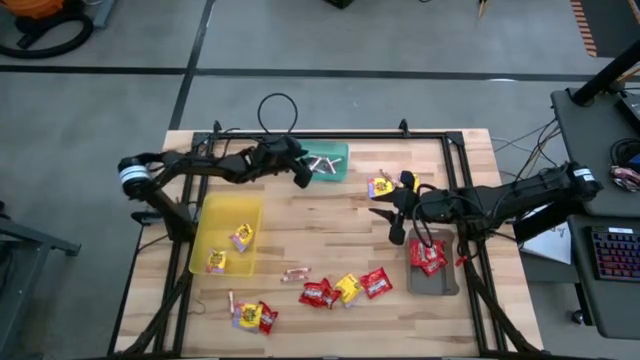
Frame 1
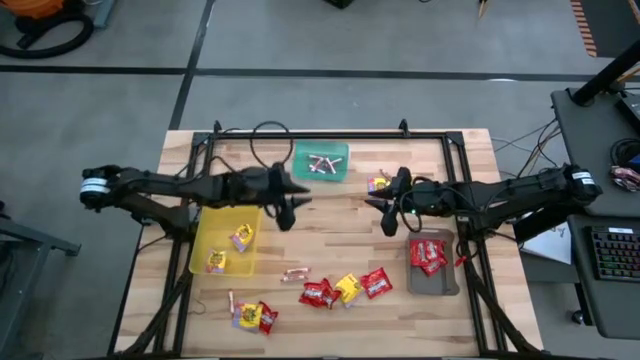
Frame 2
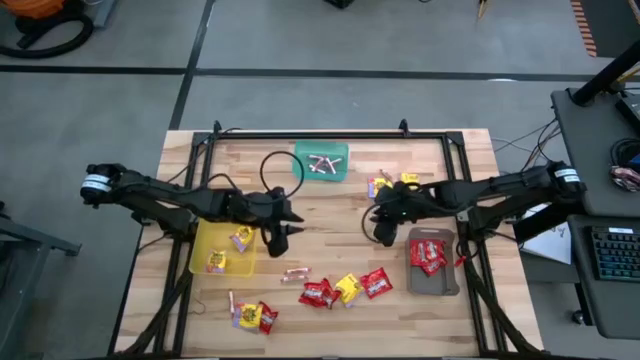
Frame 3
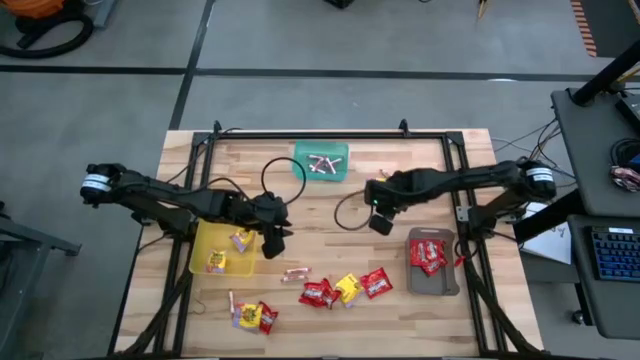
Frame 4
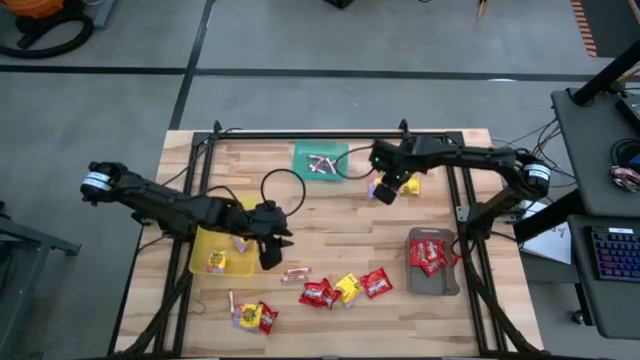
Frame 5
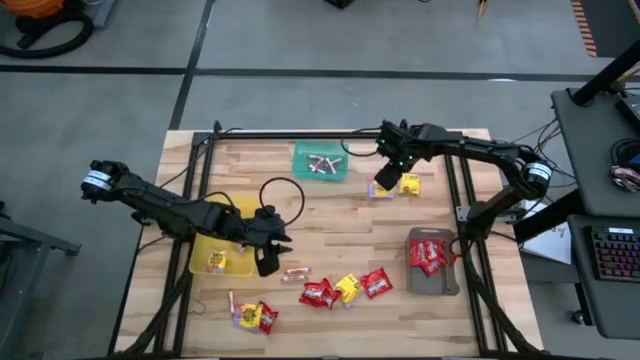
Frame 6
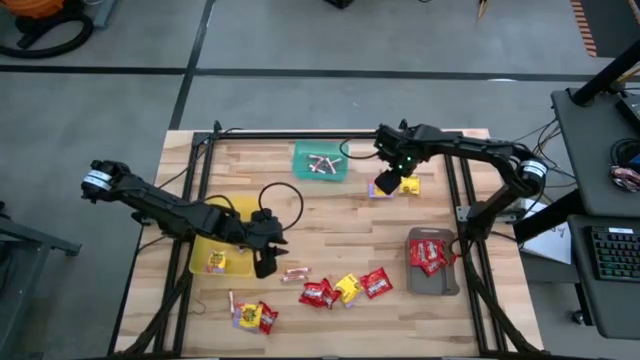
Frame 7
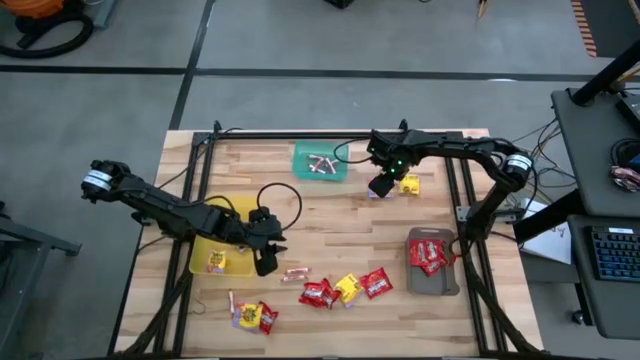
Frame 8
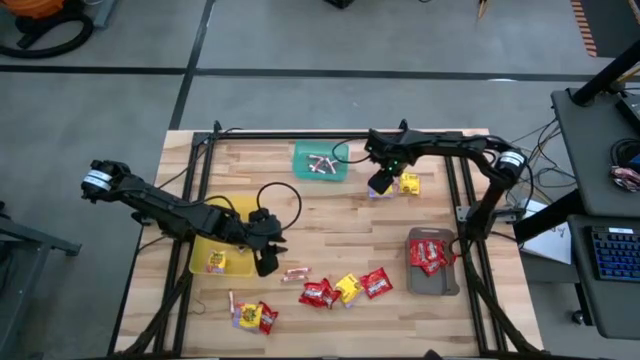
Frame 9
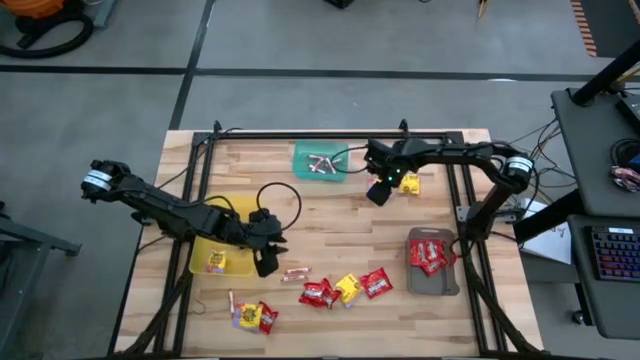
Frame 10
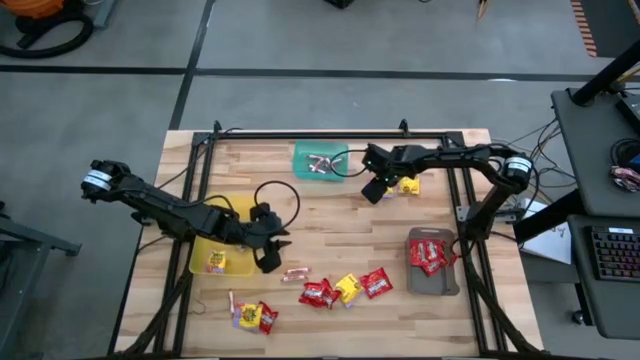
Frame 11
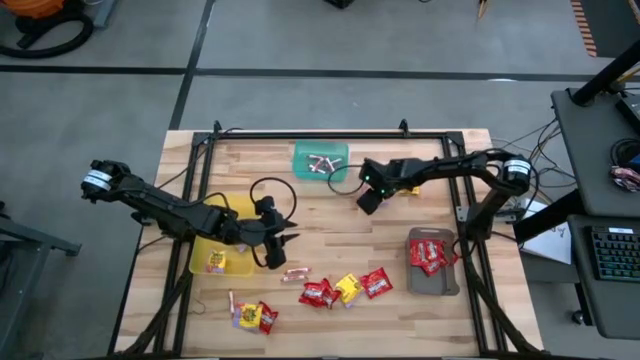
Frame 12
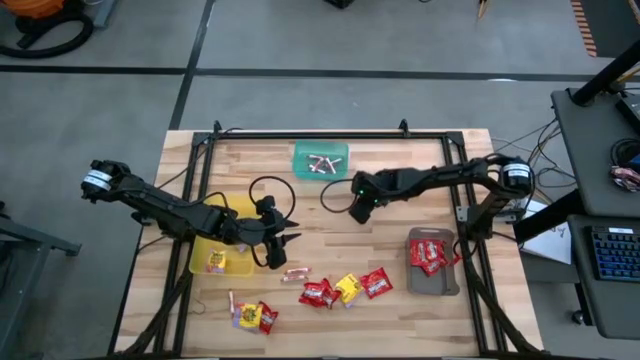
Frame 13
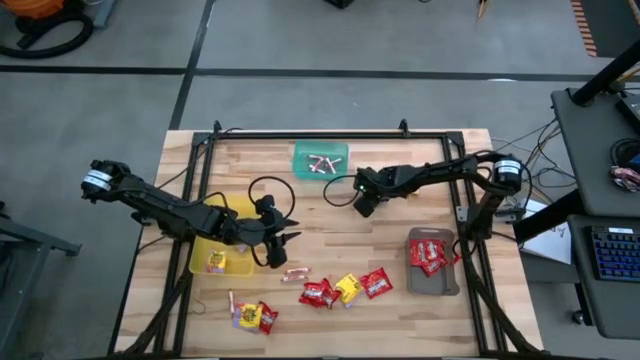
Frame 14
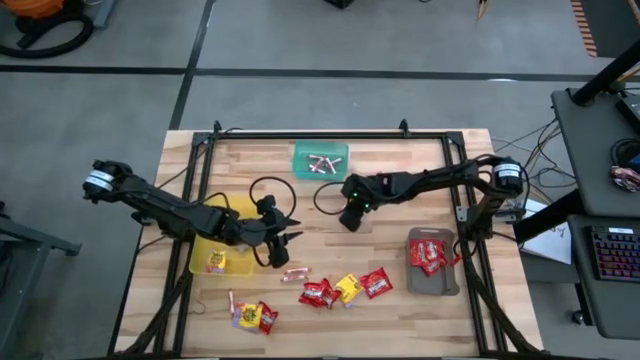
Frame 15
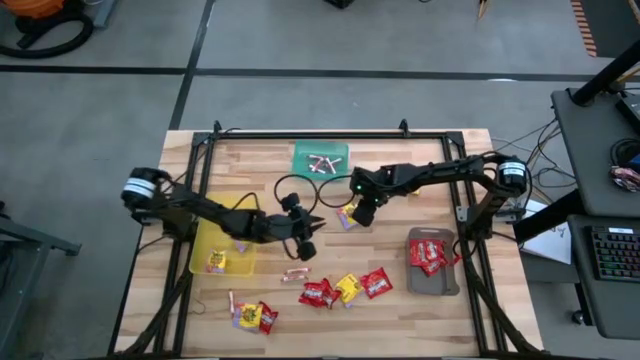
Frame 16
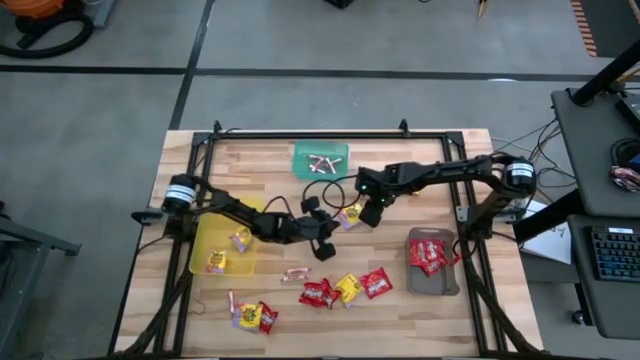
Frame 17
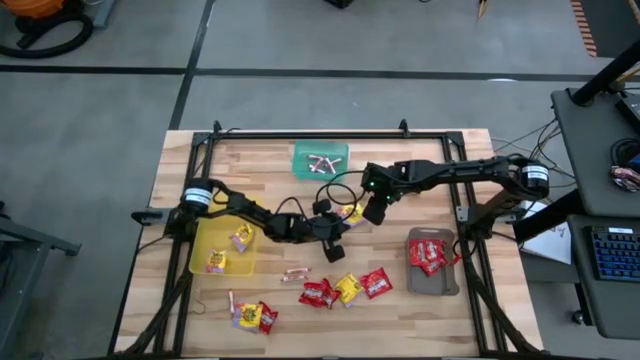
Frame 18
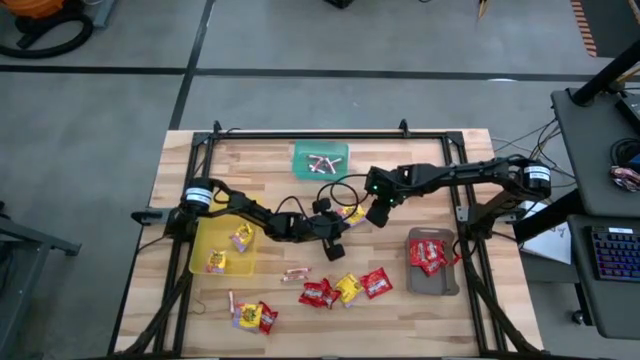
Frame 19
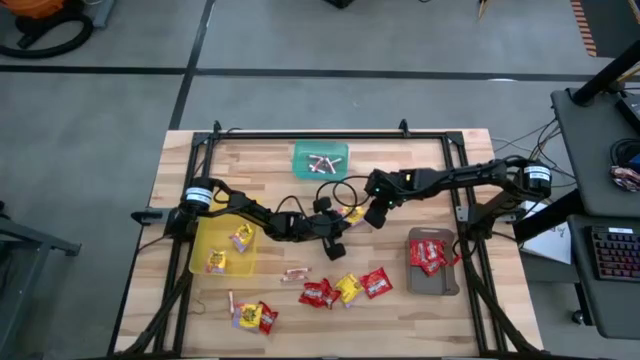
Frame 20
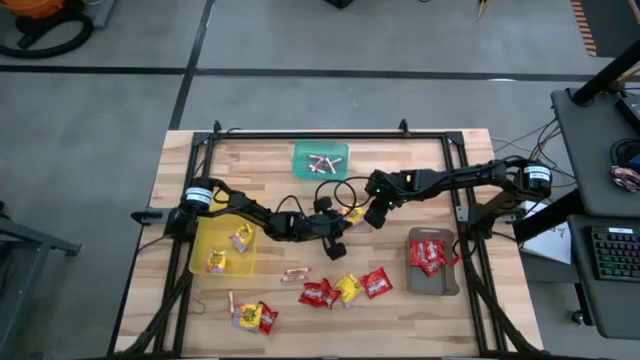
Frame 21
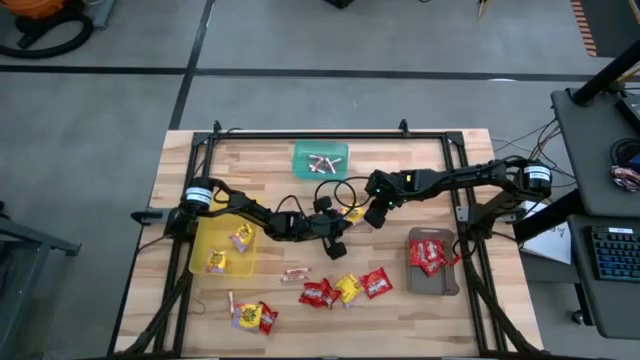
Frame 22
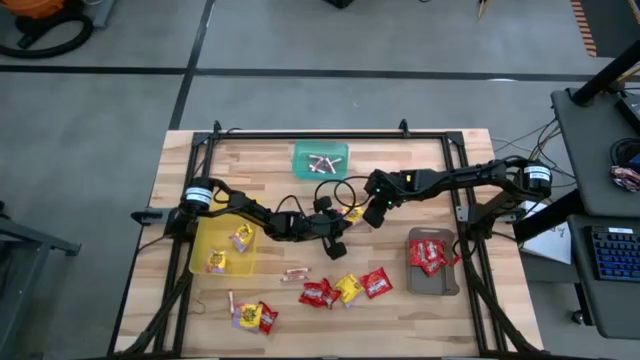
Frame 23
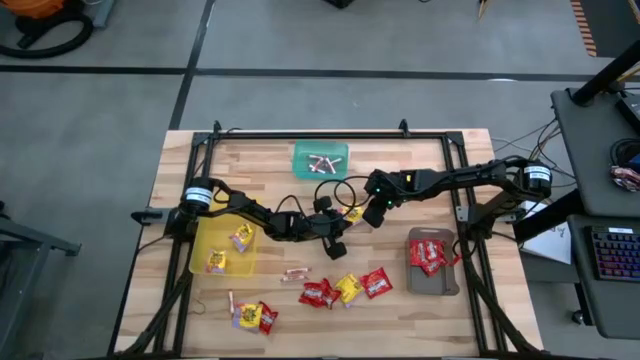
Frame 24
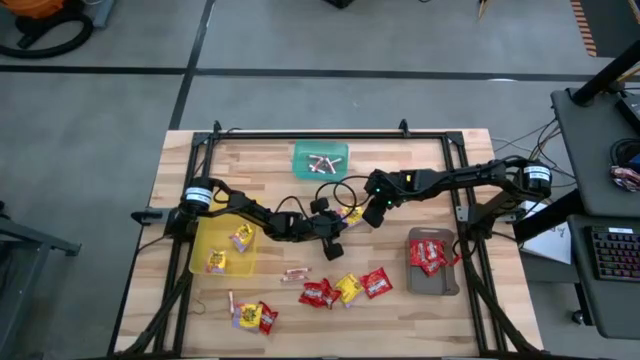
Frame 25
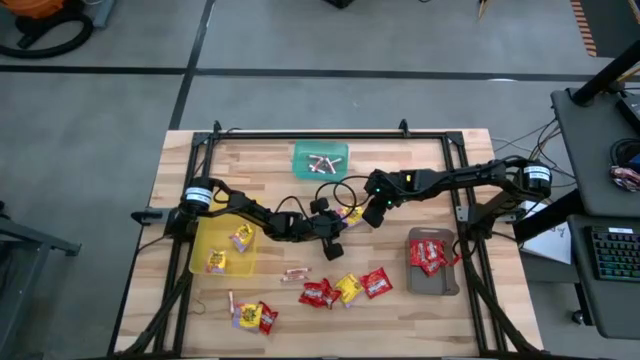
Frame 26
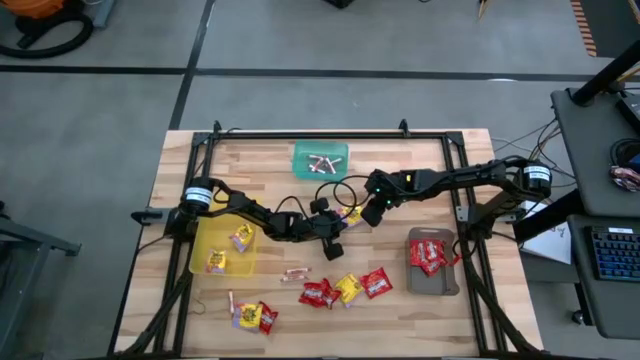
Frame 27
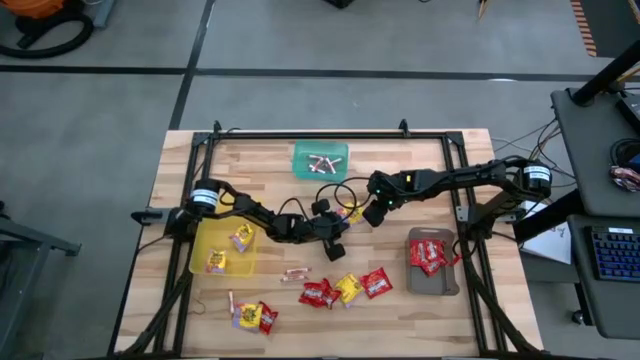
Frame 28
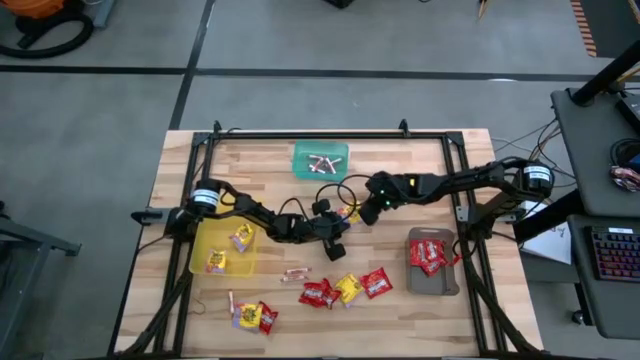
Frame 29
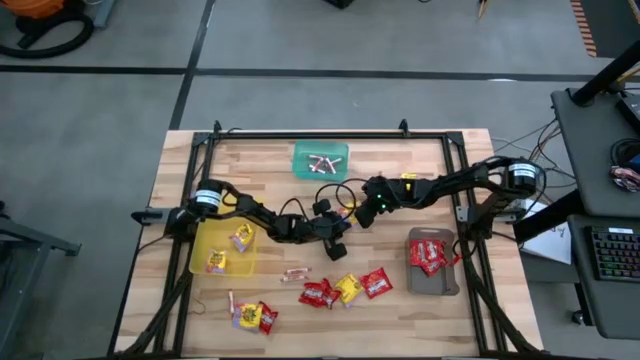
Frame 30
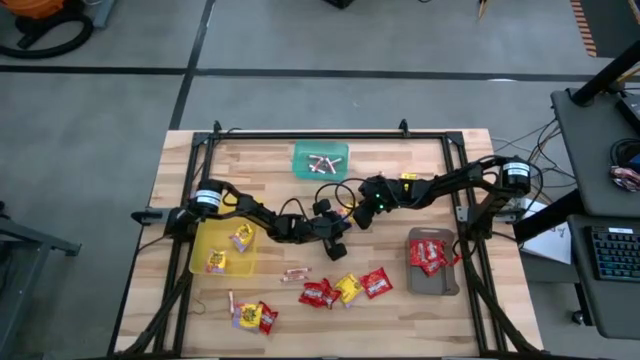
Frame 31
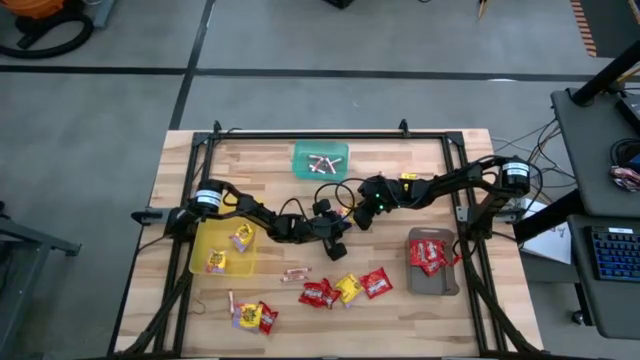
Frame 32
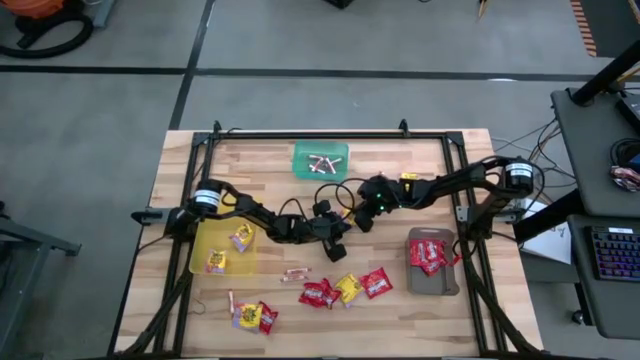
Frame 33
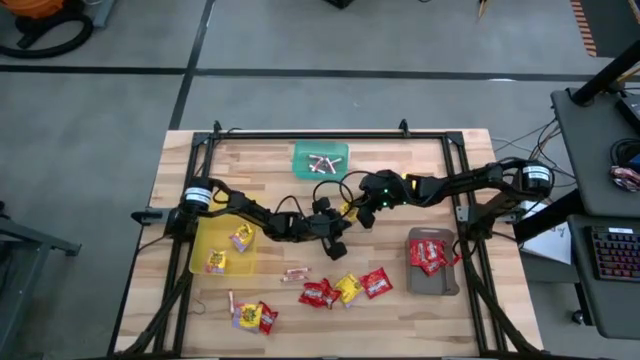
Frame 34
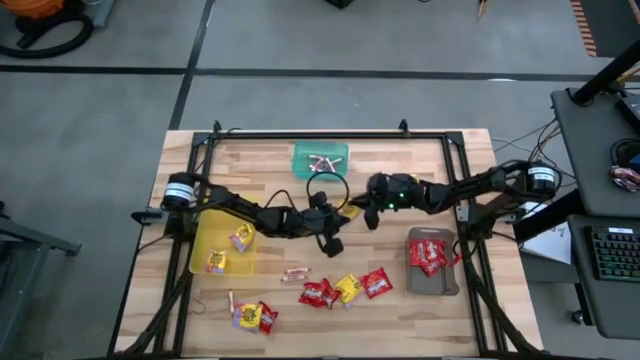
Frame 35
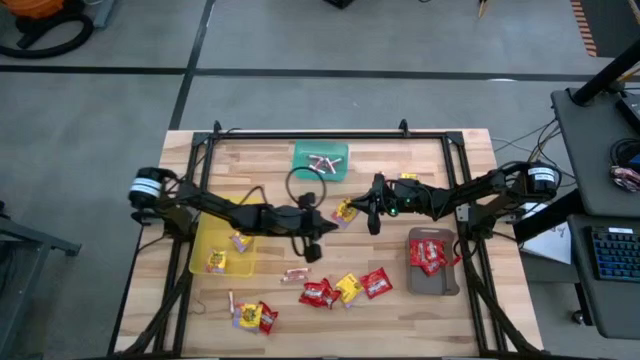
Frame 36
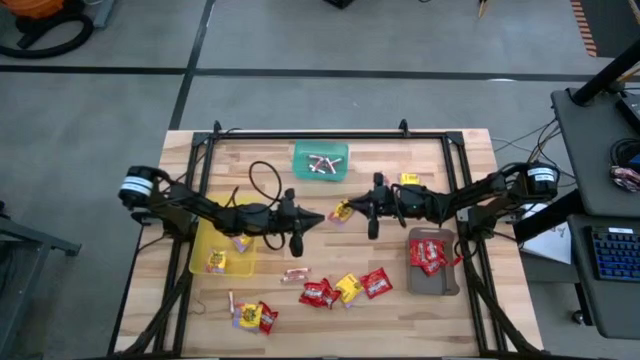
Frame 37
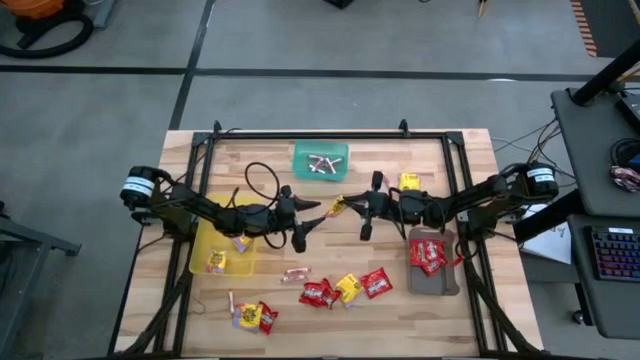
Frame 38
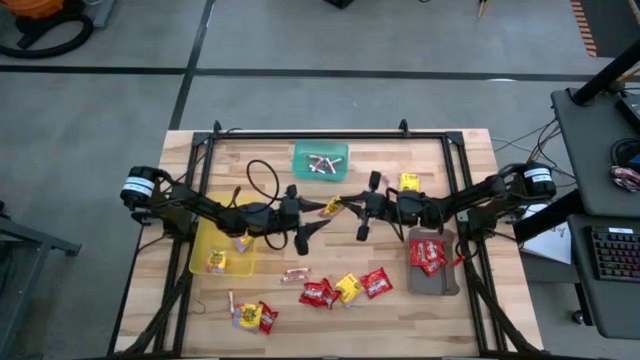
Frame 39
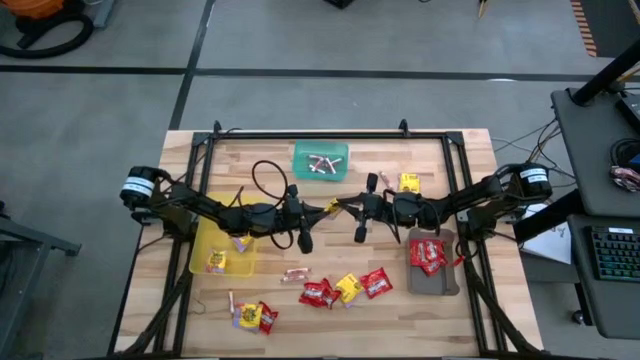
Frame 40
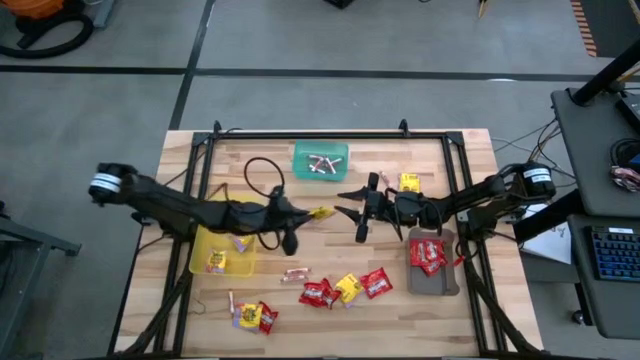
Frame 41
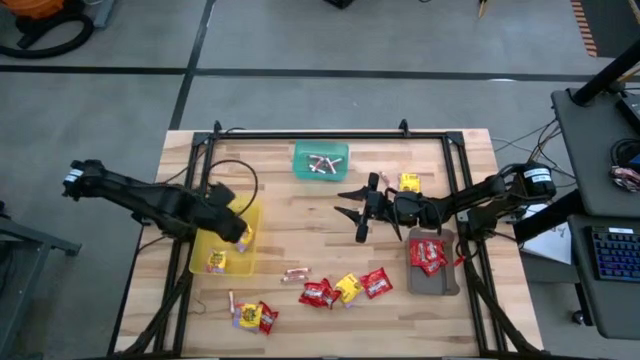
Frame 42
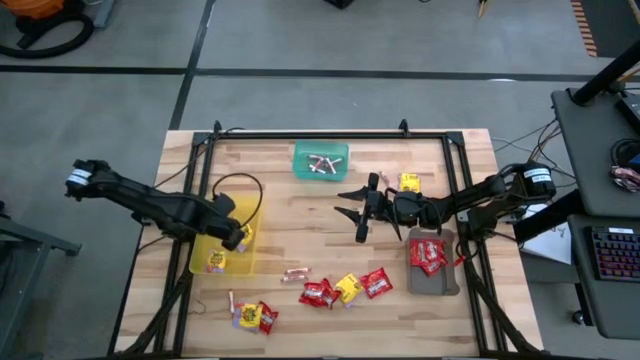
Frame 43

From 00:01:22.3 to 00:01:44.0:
Task: Sort candy
Put the yellow candy into the yellow bin
